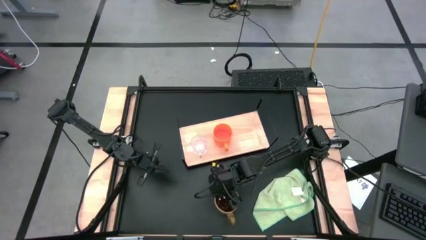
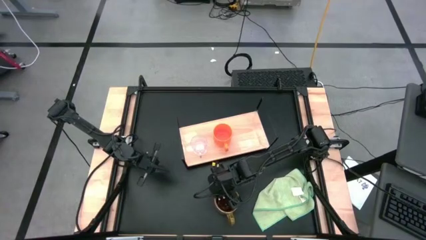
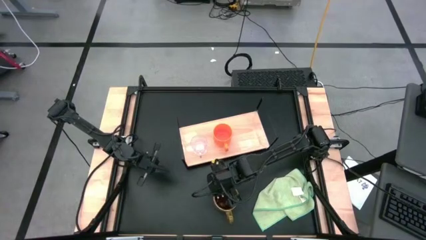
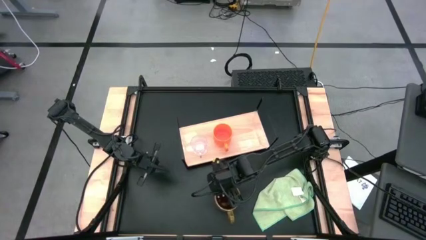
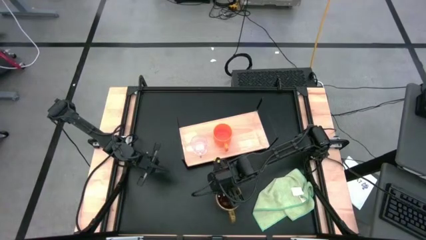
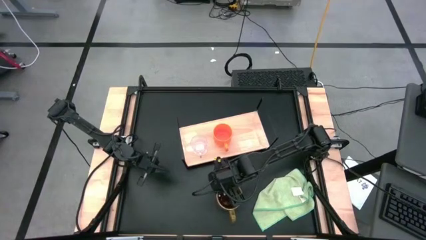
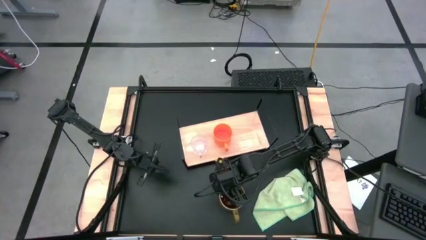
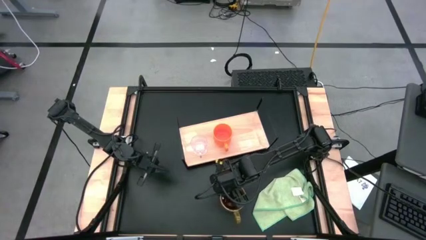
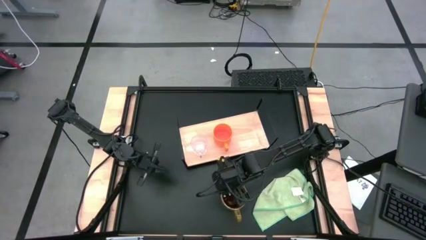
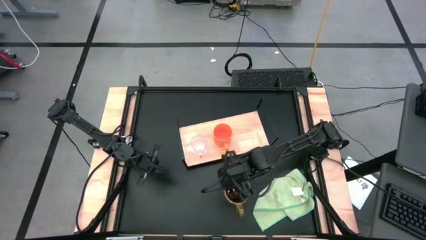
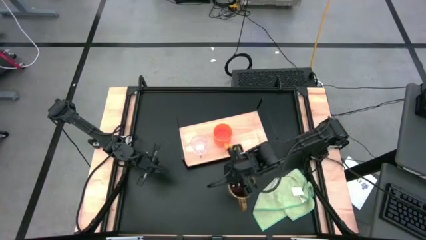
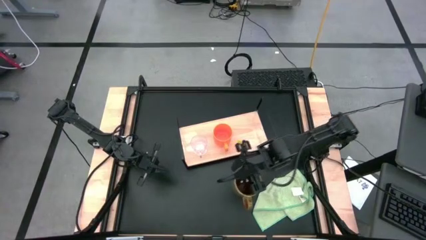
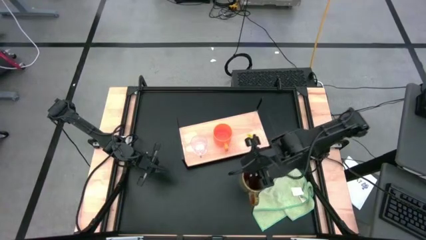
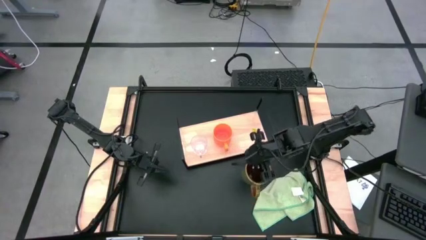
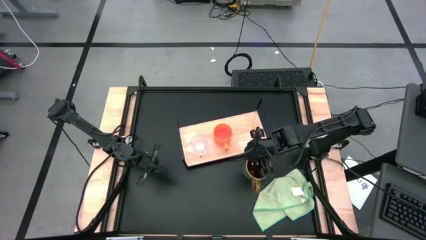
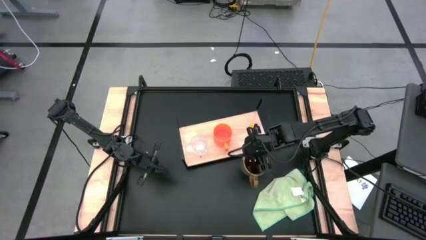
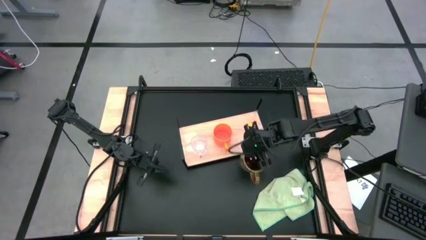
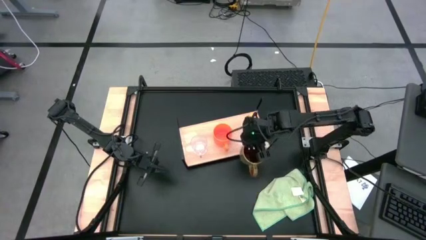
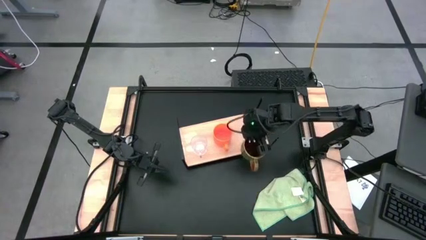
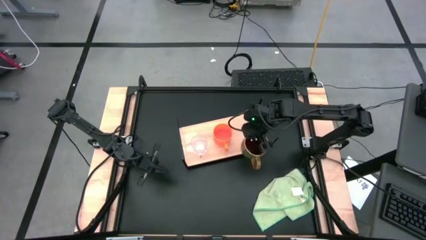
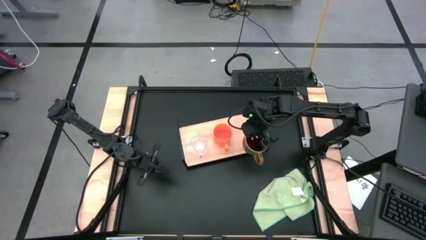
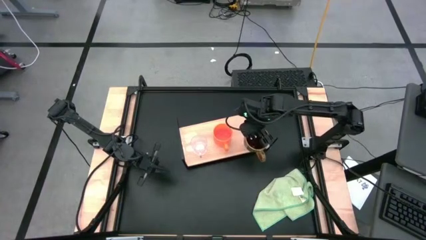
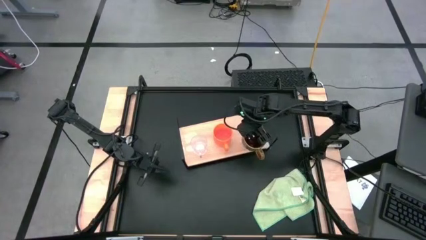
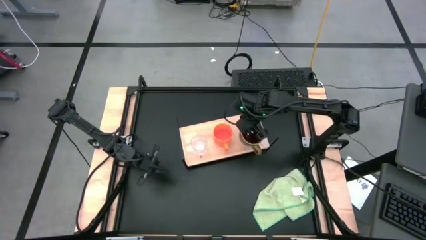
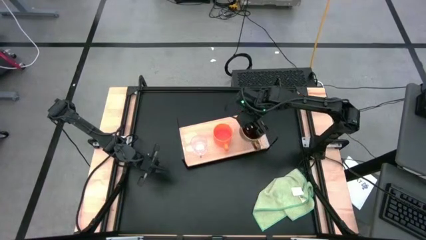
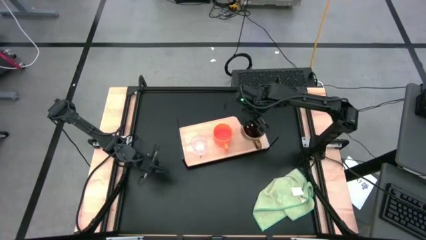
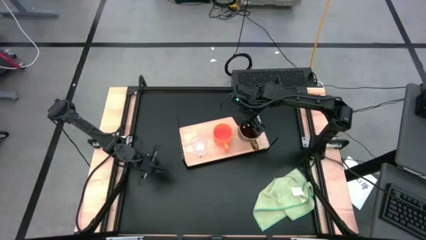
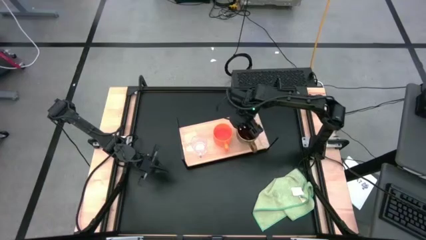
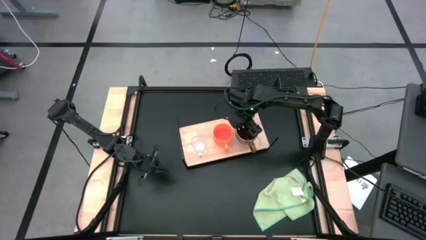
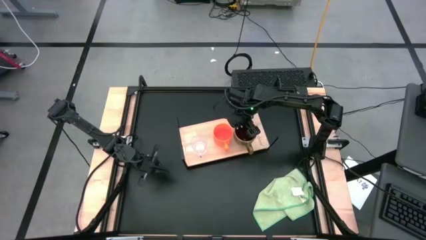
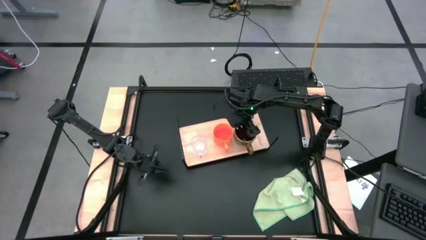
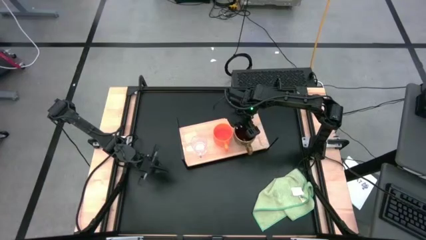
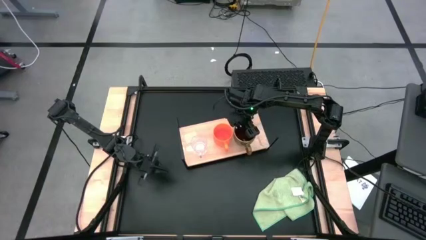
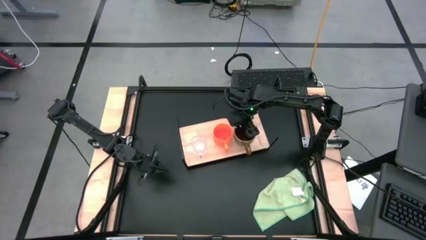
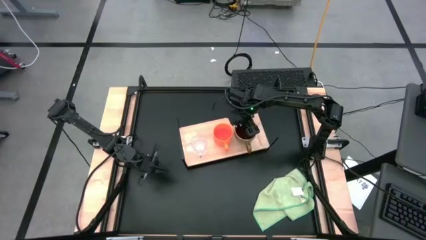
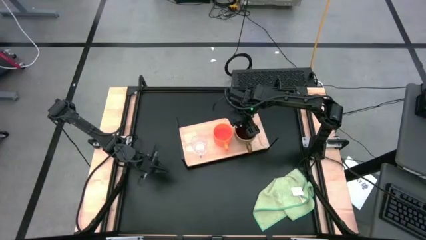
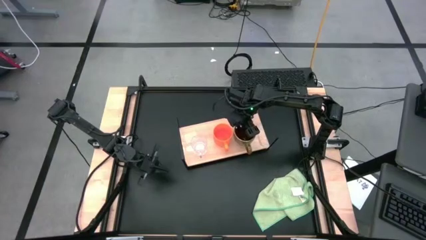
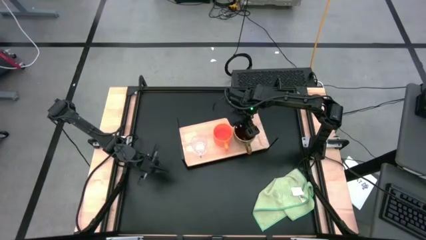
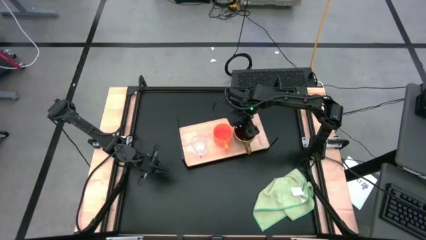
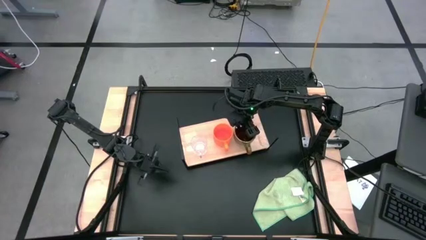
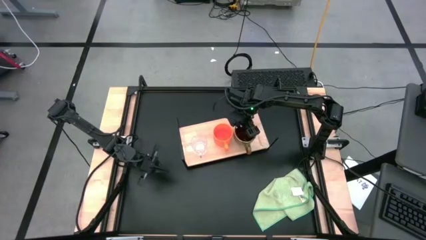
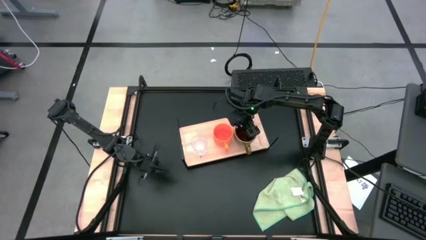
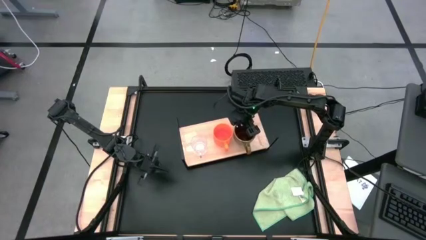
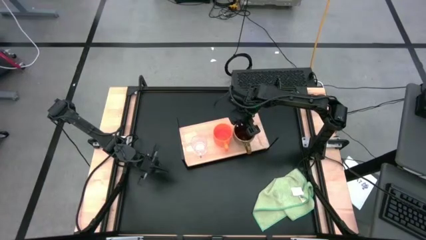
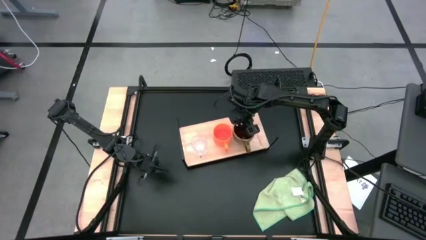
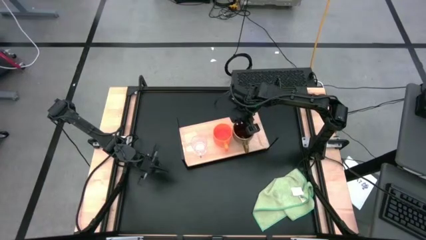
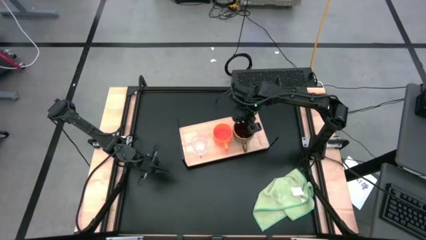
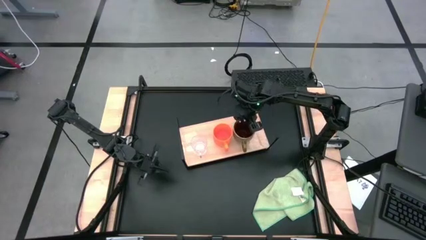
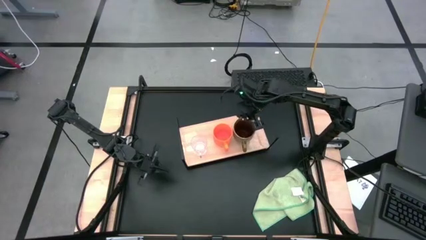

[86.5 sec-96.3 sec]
Task: Stack small to large cups/mugs on shelf
Put the green patterned mug on the shelf

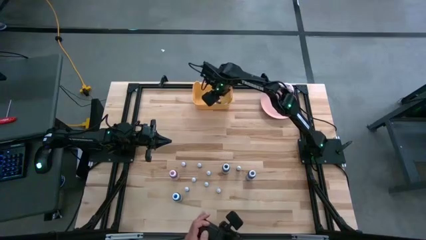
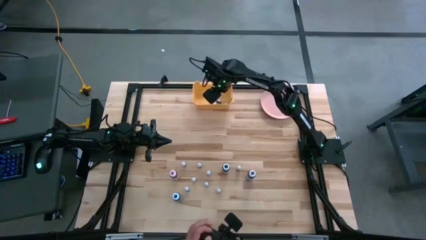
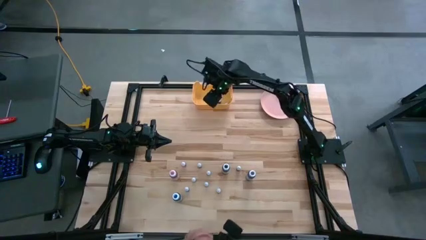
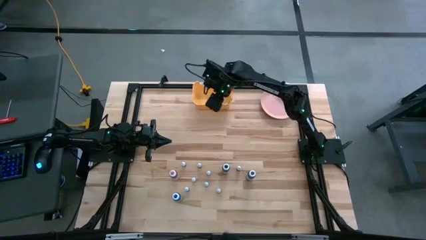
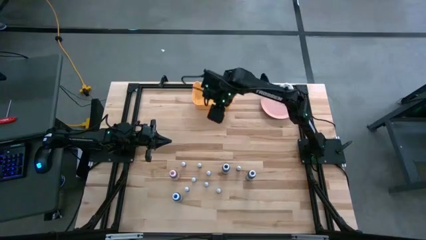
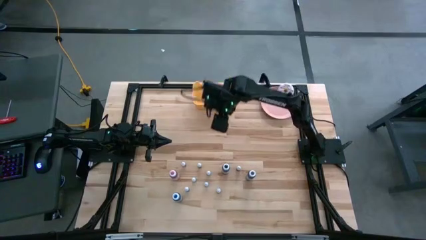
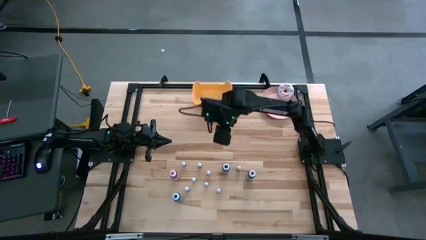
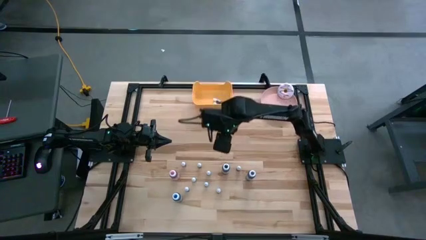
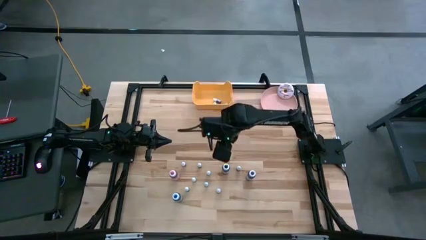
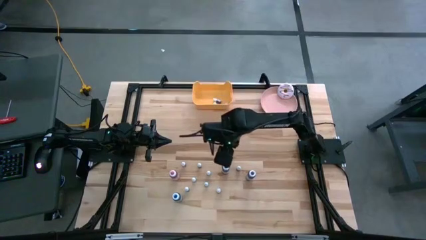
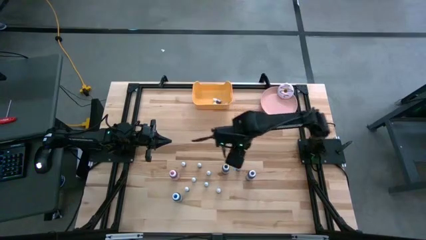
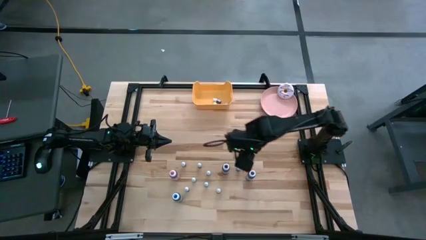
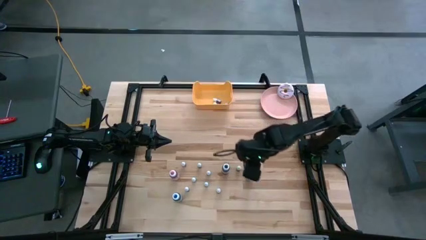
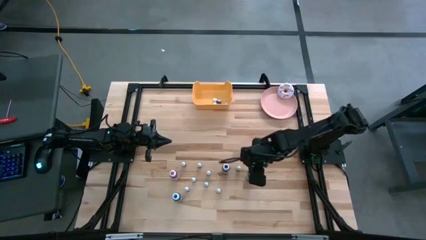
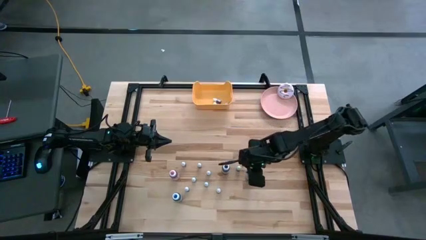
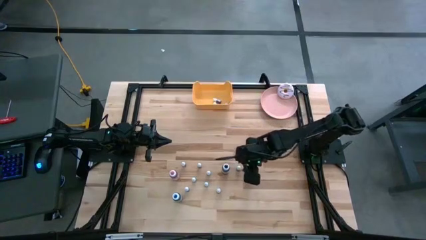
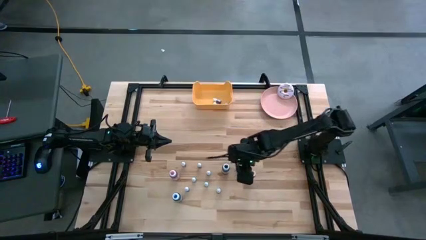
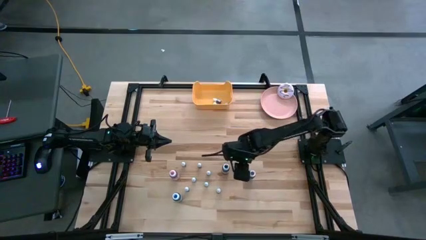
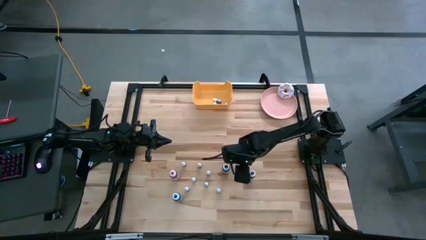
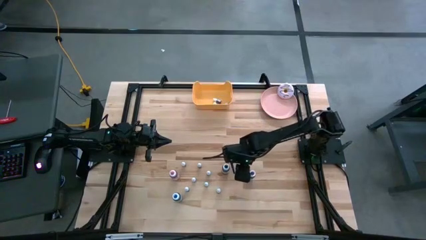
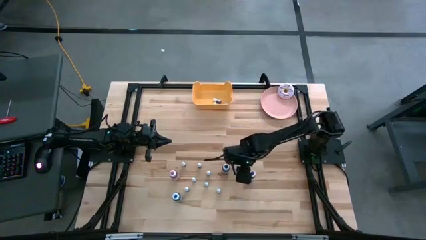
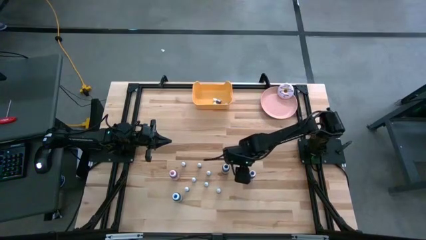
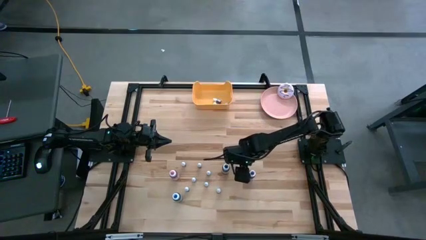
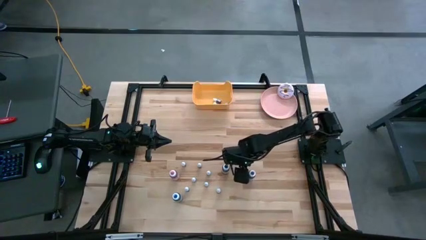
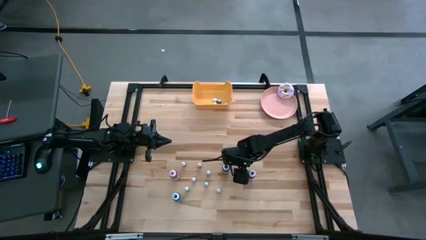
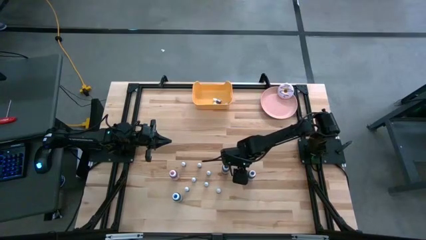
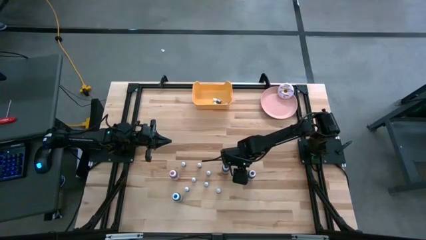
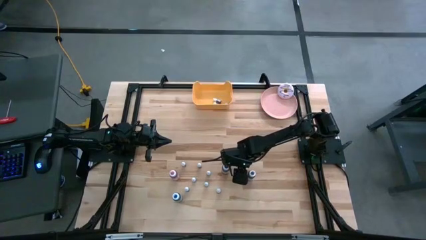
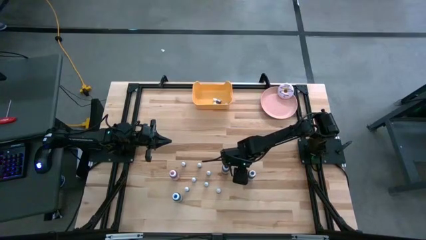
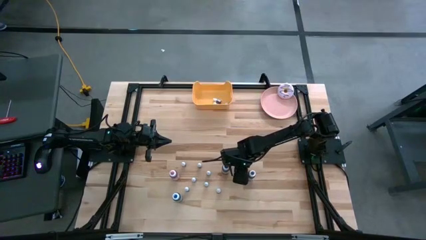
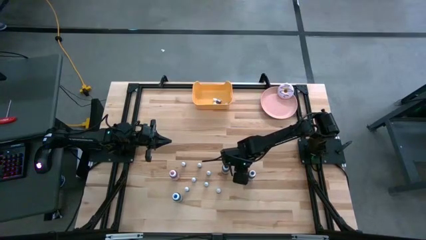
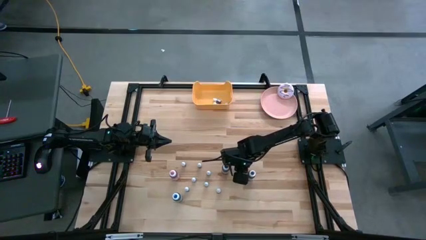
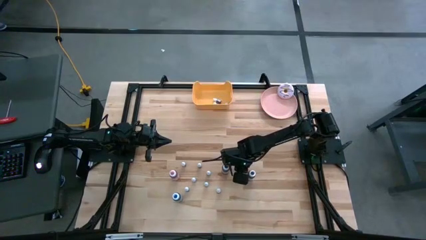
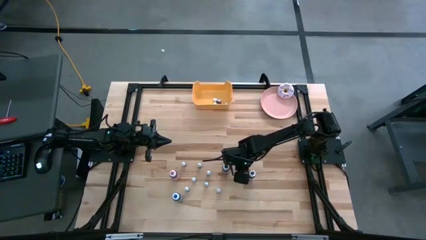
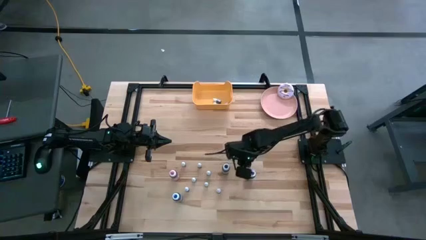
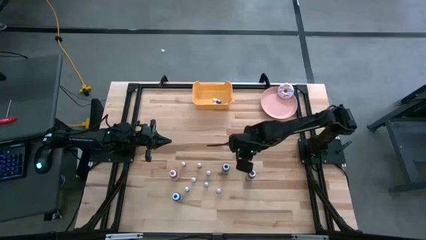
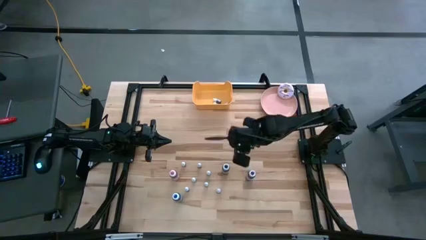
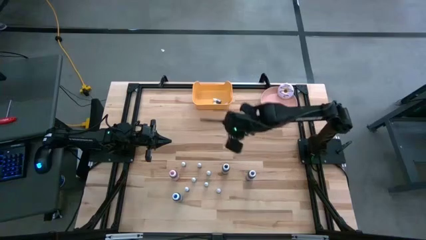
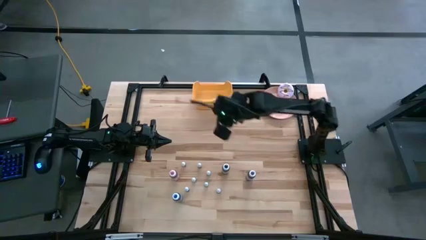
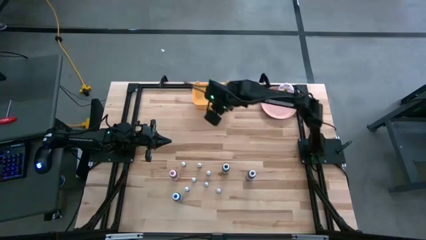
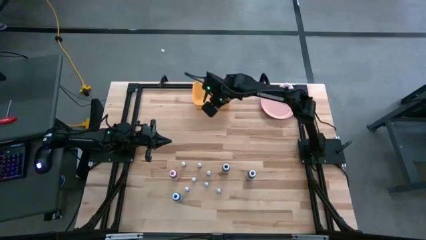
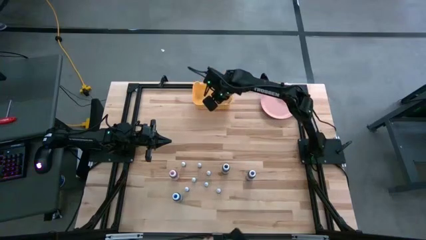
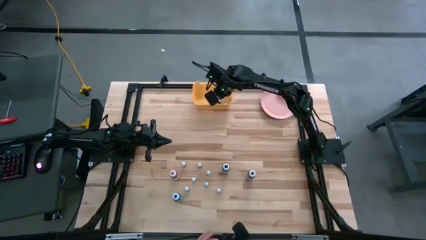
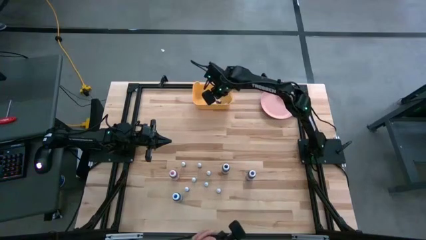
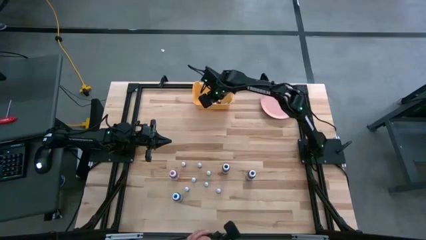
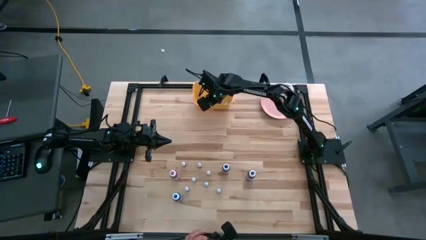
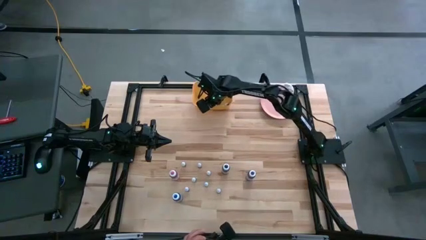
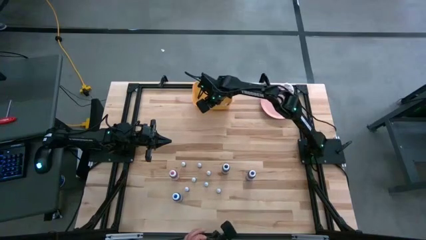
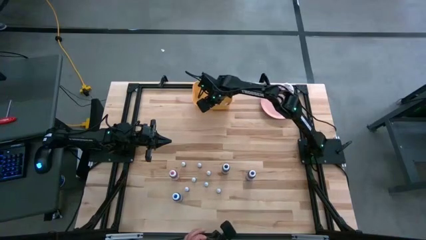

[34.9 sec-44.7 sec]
Task: Pick & Place food coloring
Put the small green food coloring bottle into the yellow bin
